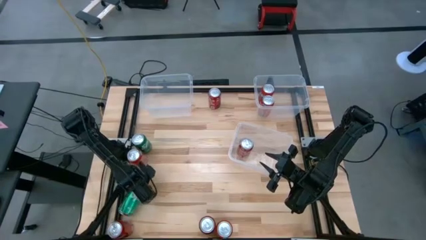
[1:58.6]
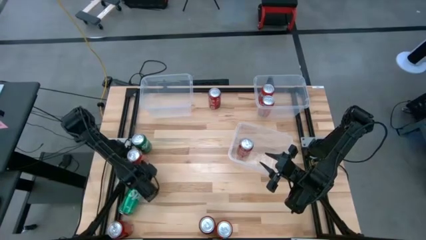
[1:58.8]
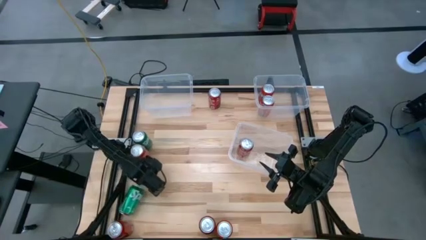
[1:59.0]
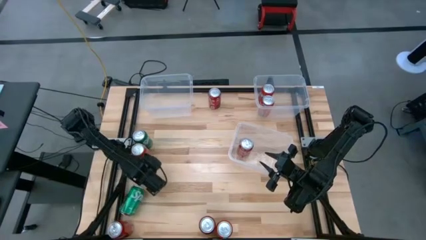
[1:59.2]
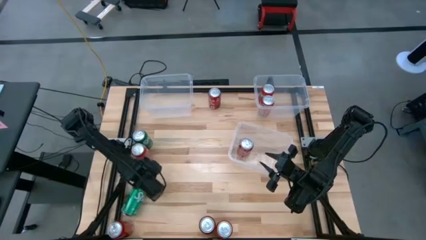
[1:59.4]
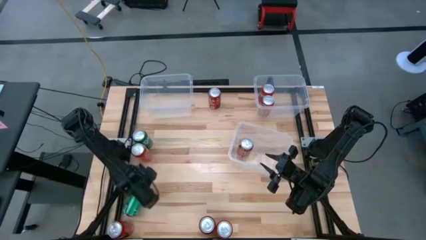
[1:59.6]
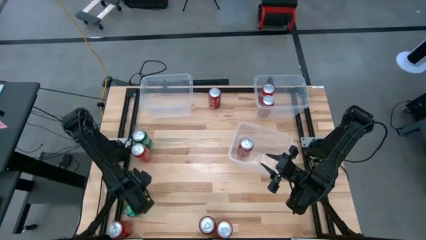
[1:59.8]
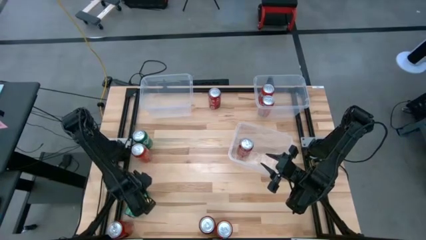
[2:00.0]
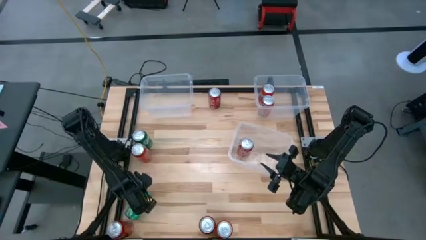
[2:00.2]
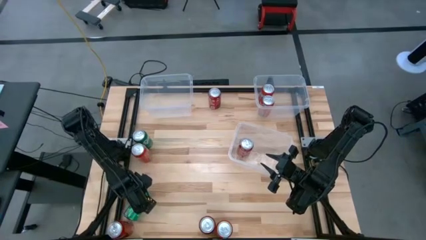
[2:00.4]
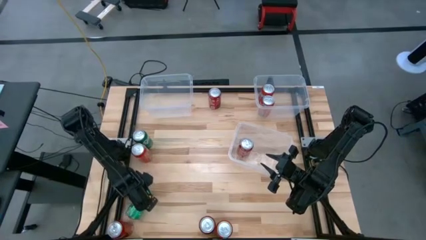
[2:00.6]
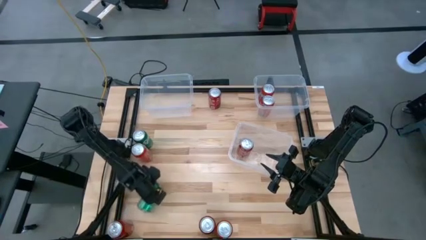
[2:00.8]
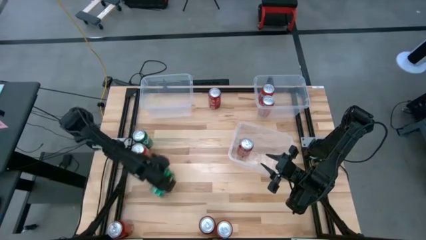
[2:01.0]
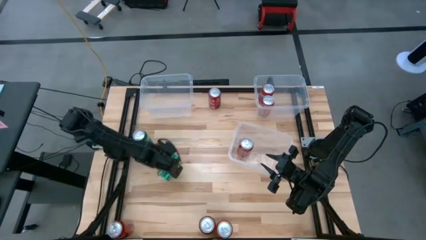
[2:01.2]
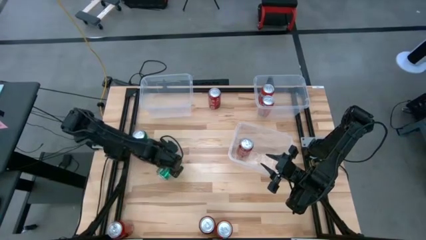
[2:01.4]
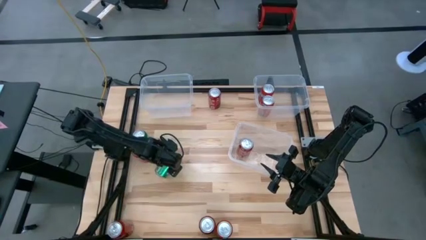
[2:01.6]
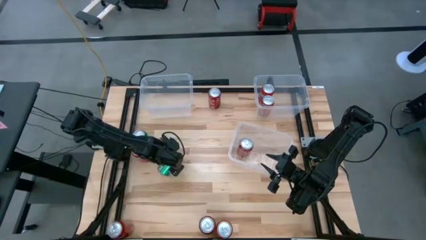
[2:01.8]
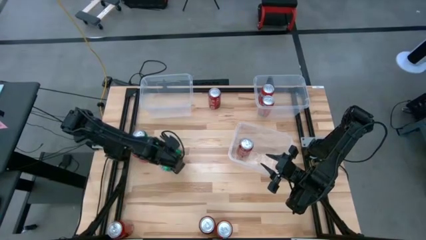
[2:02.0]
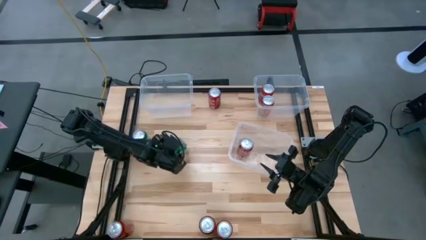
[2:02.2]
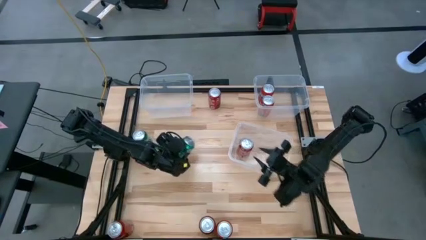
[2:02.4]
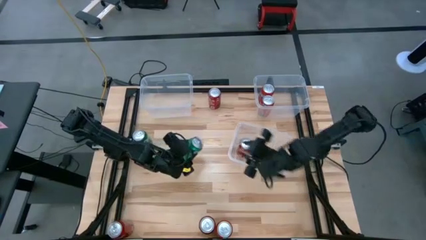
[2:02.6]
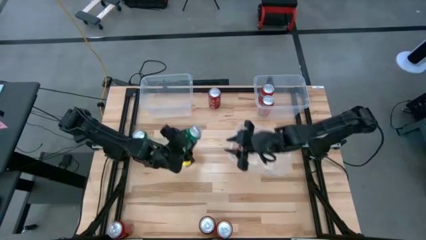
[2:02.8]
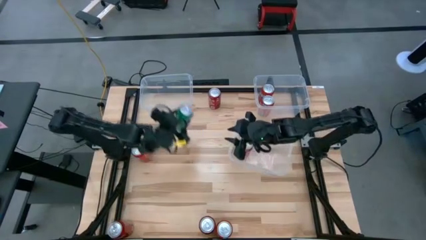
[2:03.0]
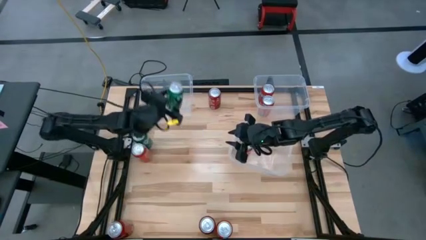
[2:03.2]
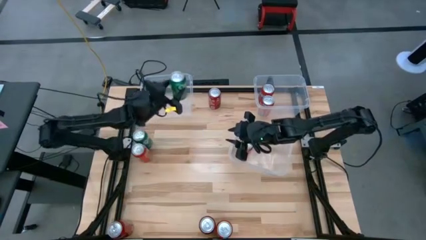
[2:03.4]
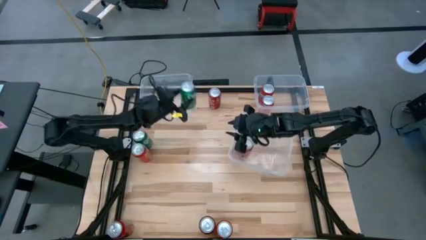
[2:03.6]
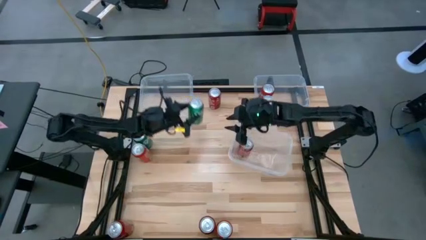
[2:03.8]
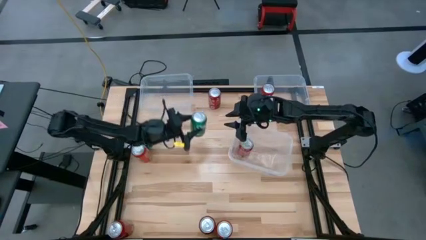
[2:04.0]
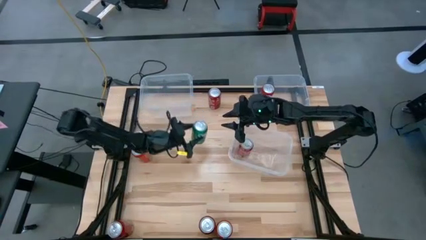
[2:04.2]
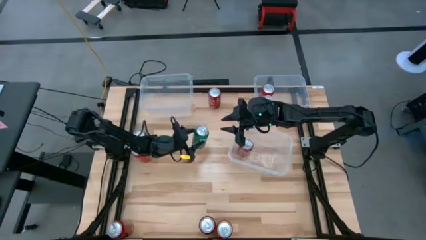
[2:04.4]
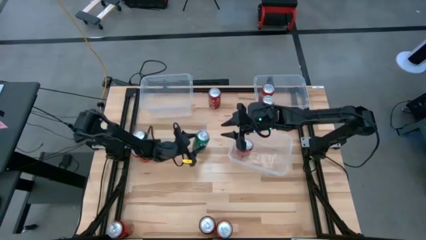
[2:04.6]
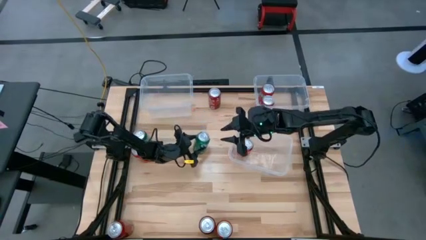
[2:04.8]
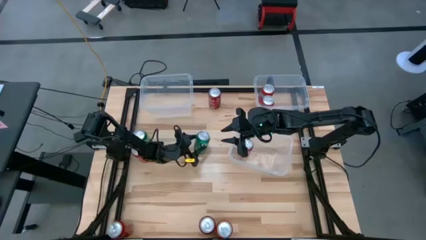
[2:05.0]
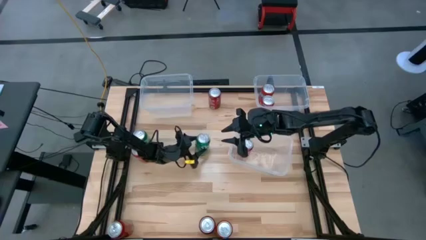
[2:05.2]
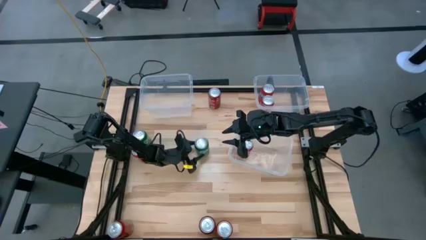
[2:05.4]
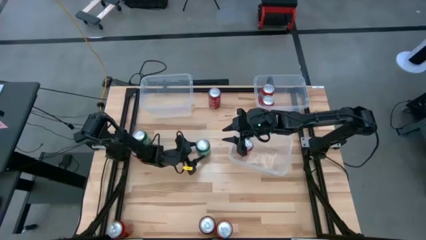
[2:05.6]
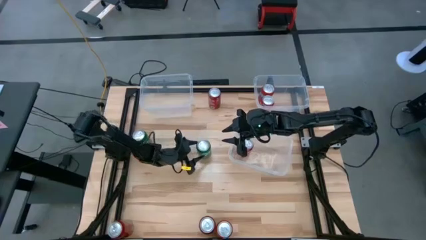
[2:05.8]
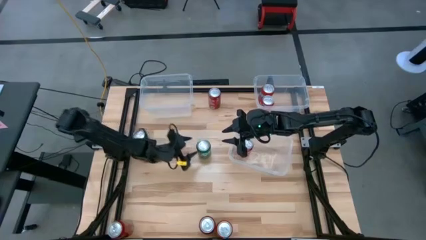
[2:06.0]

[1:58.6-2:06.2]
Task: Sort soda cans
Move the bottom green soda can to the middle of the table

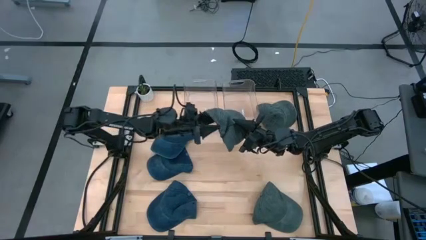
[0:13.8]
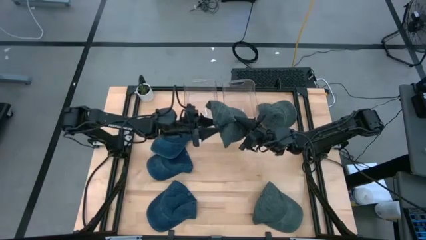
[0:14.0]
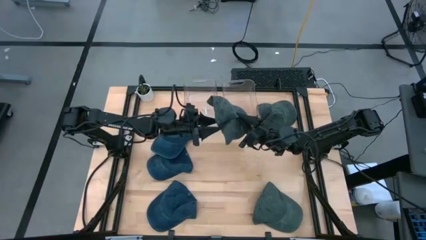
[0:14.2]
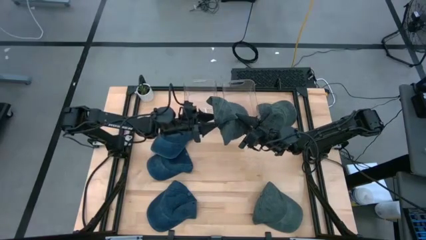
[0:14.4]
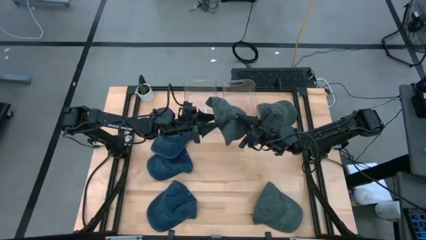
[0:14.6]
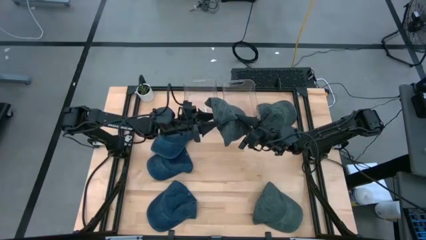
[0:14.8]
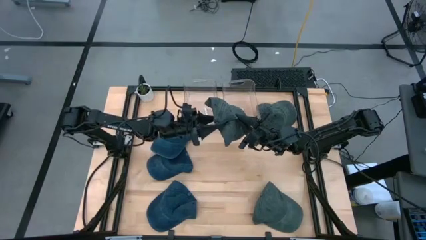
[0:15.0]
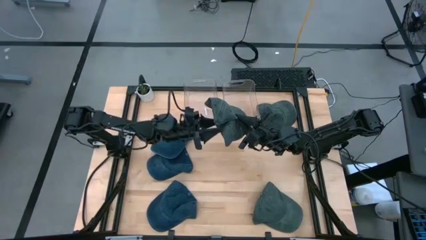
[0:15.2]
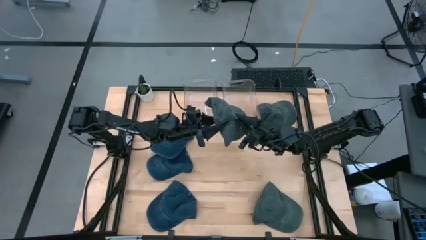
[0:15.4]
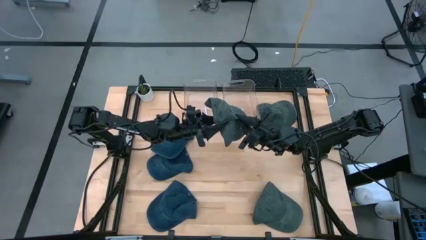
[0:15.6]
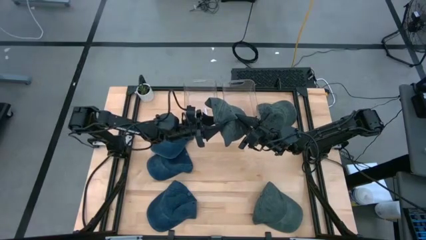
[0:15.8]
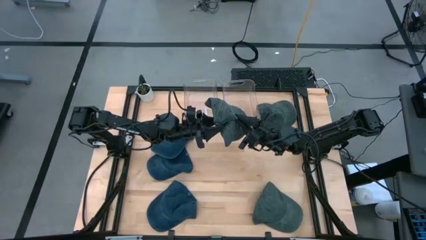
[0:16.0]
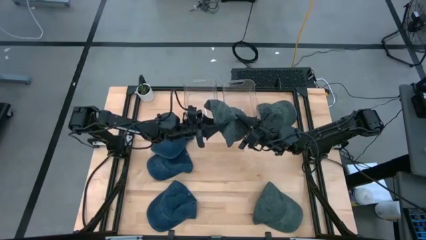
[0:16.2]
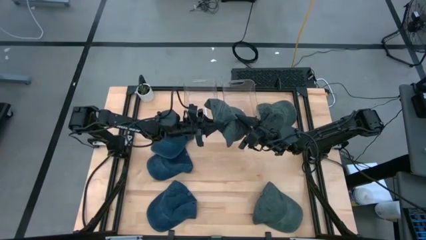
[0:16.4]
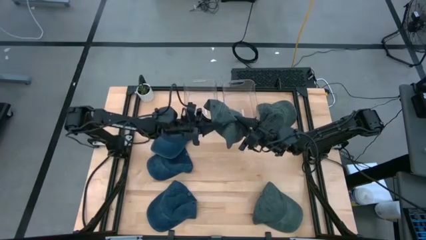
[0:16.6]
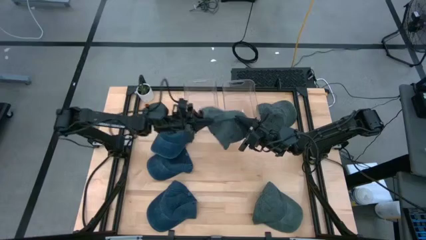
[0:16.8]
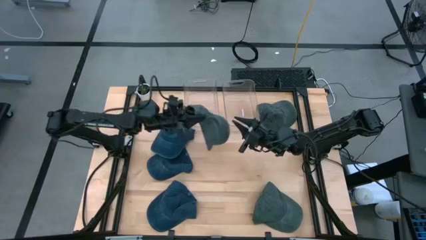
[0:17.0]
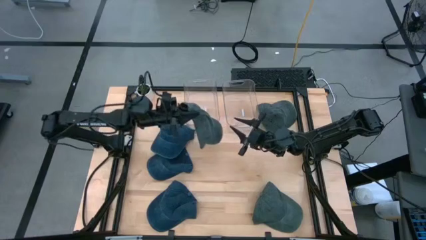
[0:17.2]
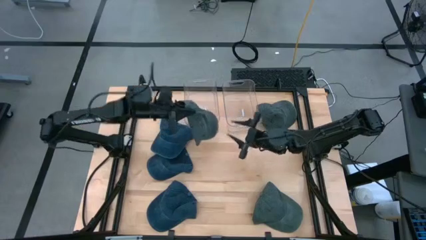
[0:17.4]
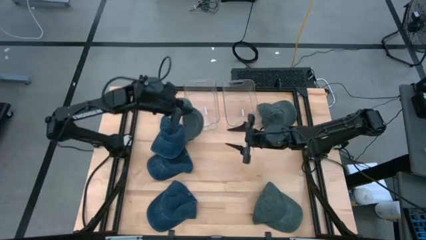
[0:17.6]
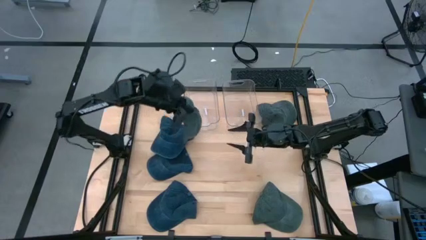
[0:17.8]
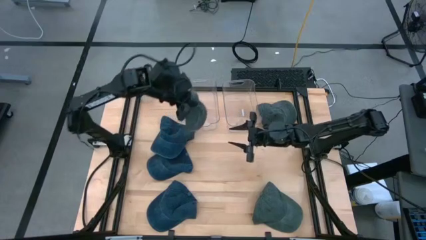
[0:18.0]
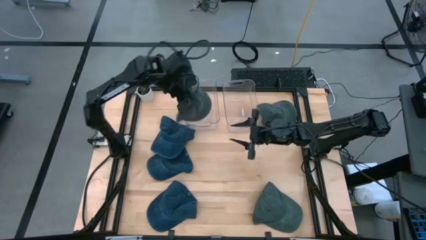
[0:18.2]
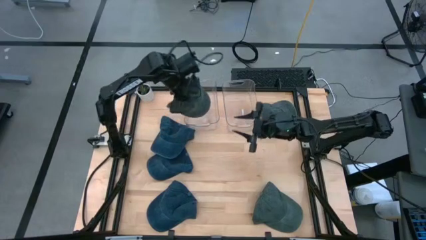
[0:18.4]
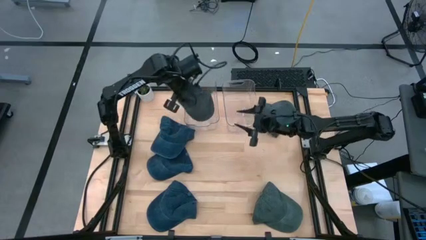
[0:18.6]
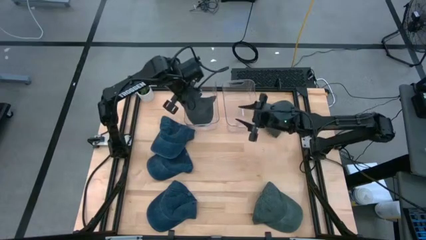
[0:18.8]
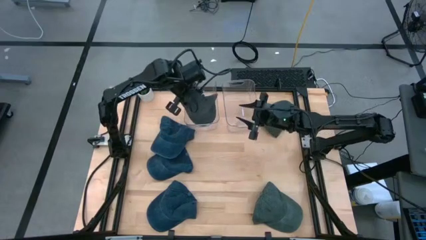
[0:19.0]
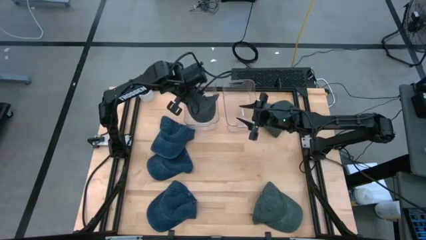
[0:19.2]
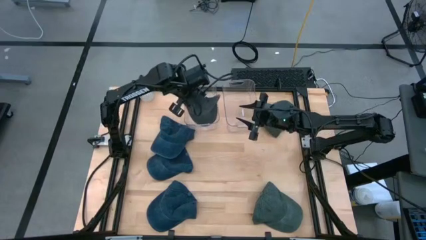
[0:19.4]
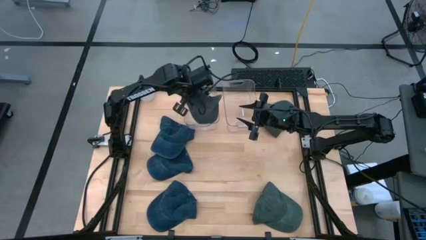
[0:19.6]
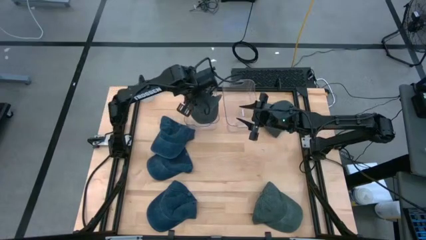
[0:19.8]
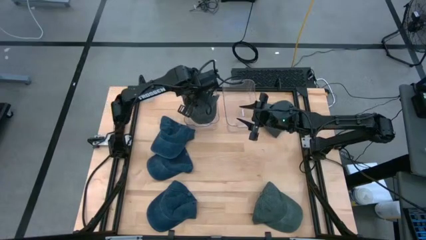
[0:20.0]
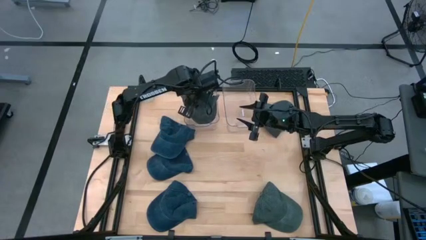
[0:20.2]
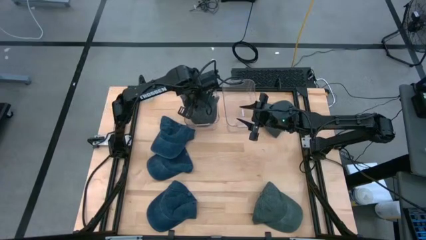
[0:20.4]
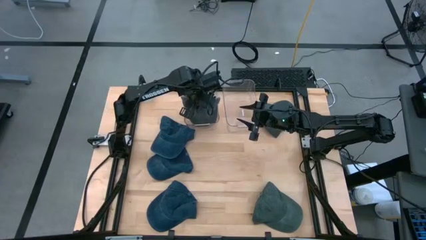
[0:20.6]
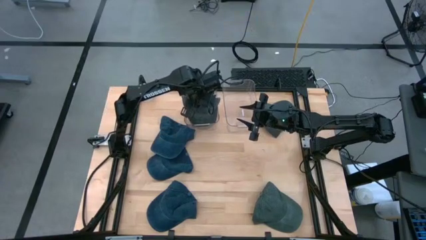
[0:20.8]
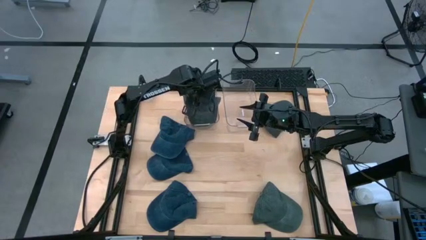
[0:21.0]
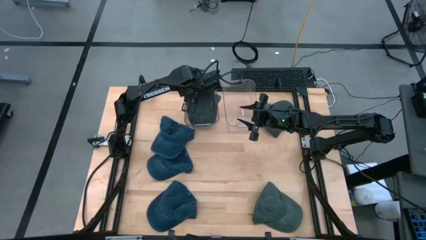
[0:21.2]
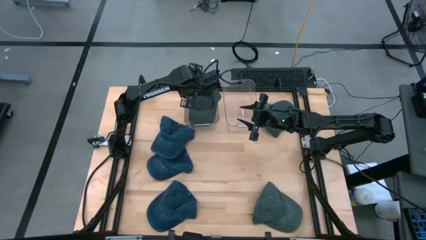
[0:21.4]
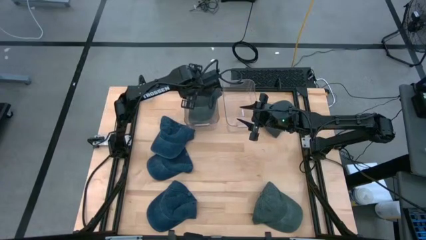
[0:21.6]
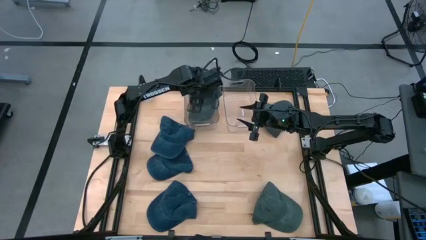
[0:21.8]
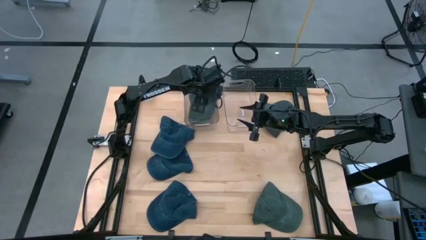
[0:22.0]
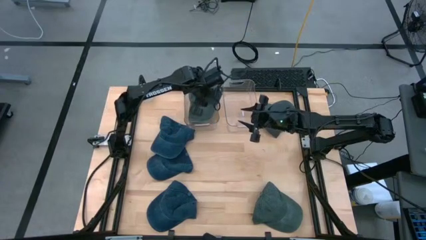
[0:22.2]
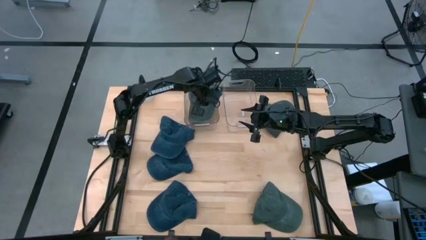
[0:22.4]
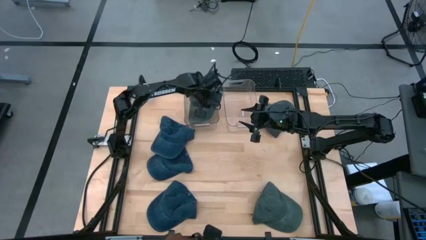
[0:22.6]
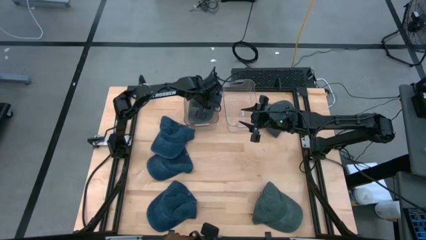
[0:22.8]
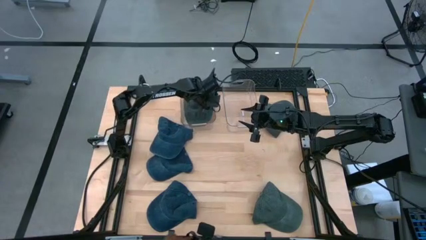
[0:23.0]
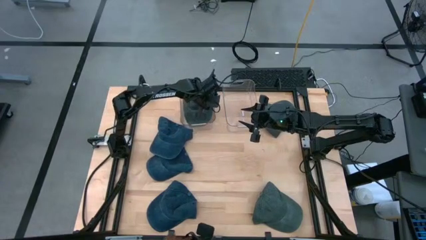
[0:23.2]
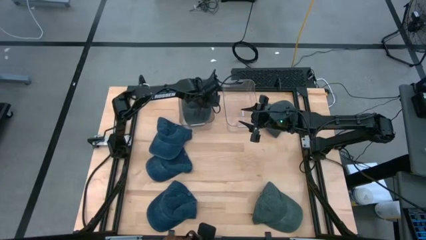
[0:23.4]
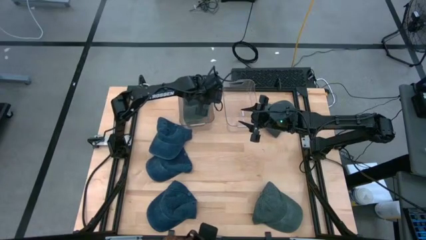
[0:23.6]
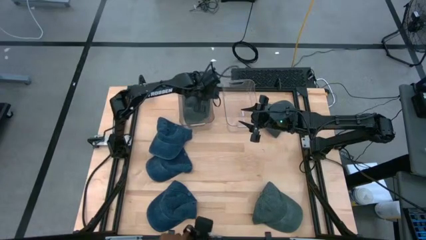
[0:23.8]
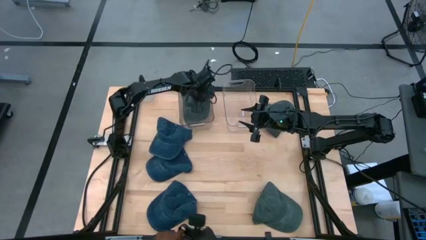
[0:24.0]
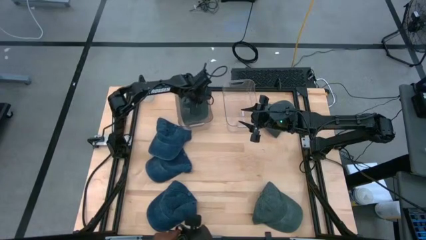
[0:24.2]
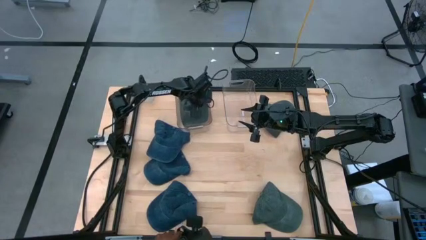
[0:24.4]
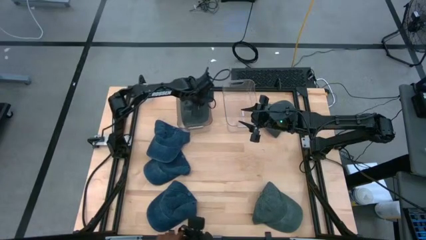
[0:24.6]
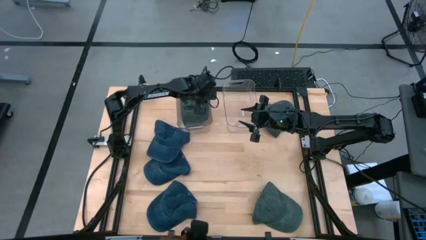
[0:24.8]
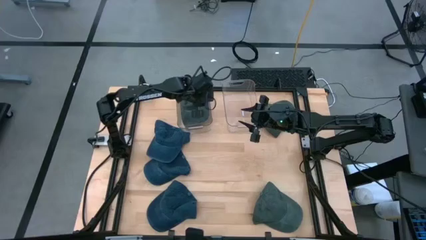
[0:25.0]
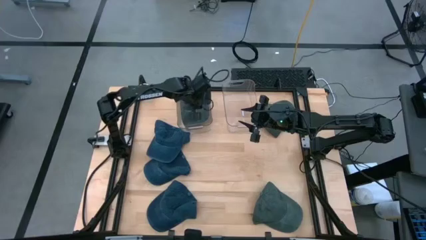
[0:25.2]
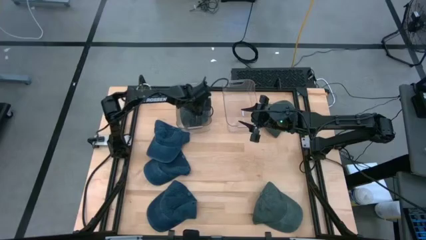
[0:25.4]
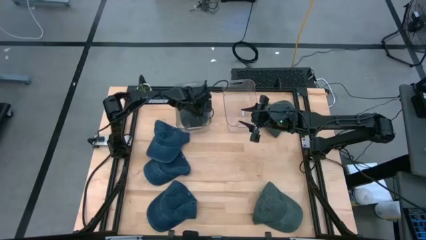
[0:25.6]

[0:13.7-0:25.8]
Task: Pick & Place hat
Put the middle gray cap into the left transparent bin
